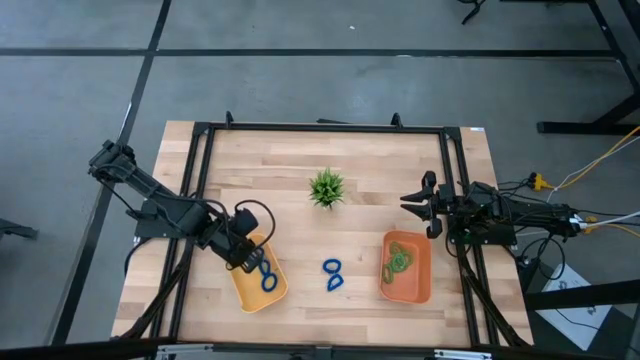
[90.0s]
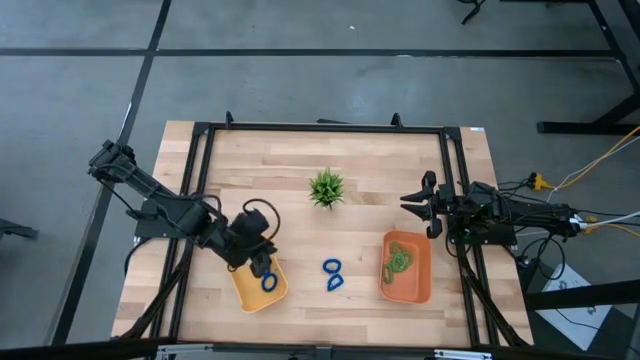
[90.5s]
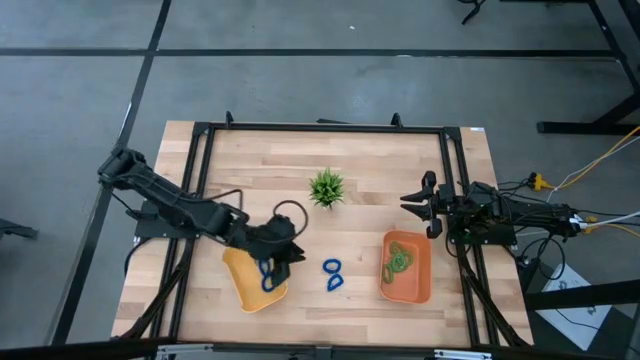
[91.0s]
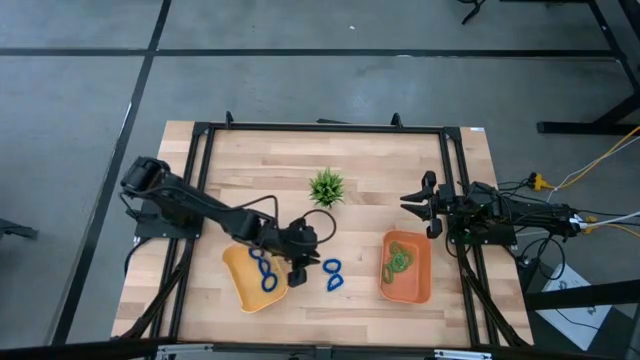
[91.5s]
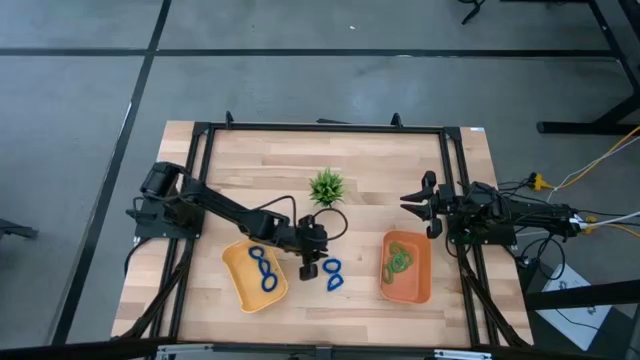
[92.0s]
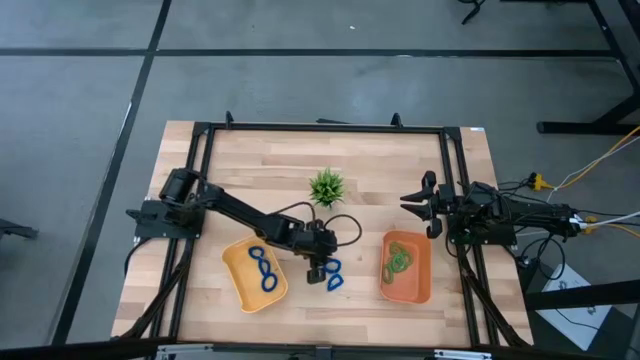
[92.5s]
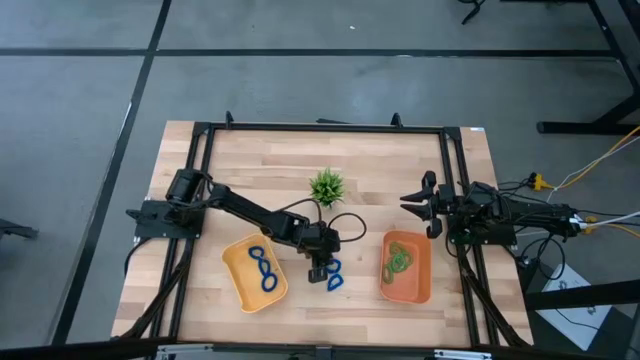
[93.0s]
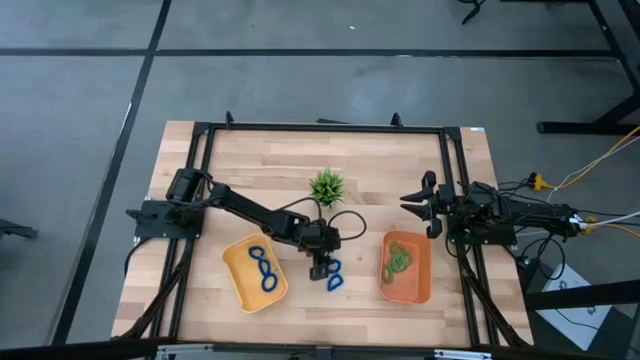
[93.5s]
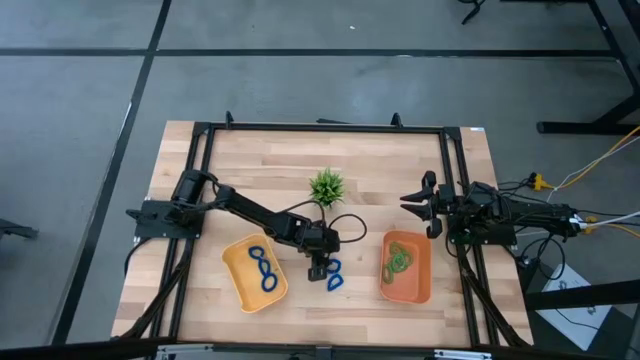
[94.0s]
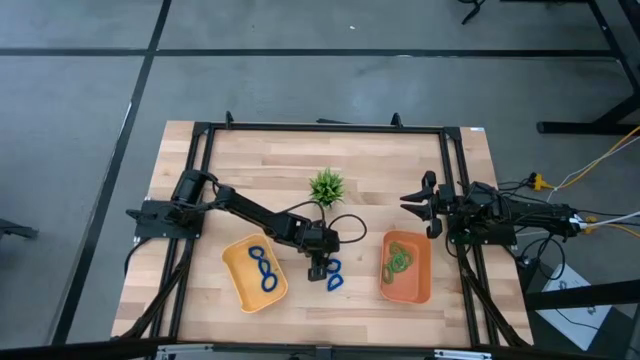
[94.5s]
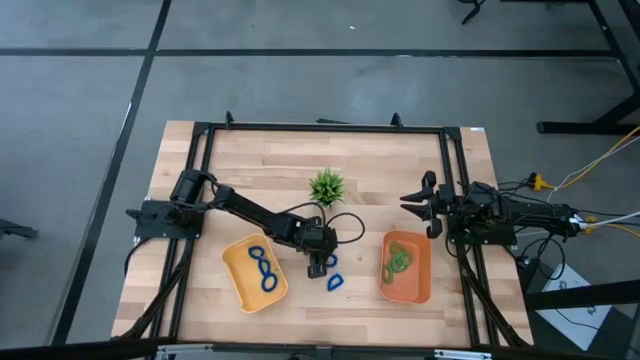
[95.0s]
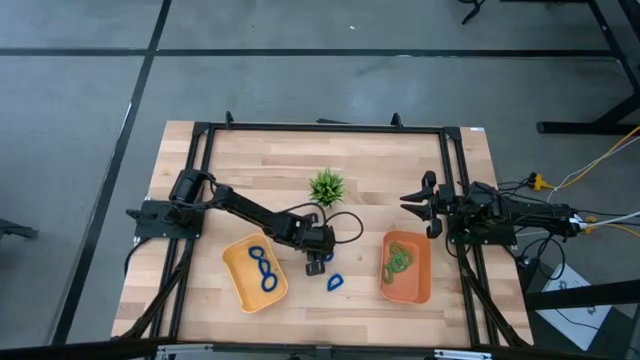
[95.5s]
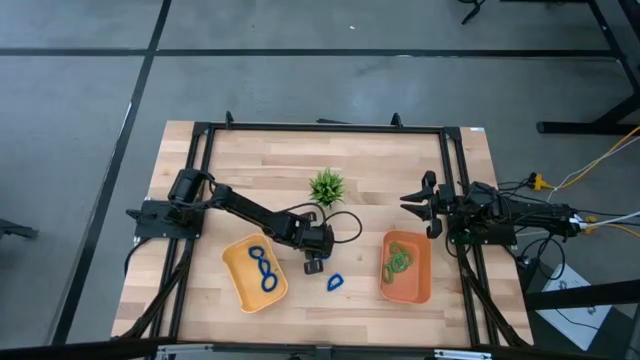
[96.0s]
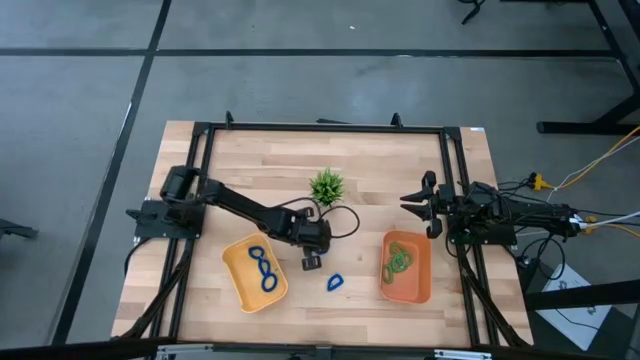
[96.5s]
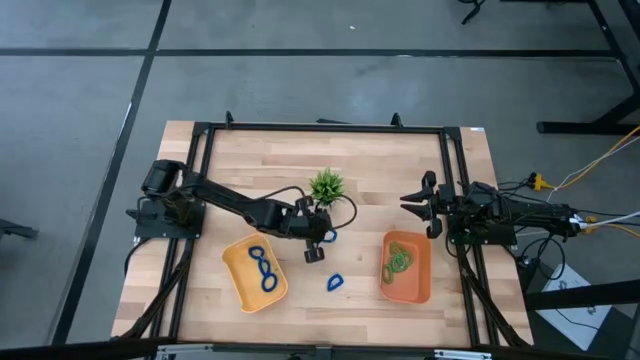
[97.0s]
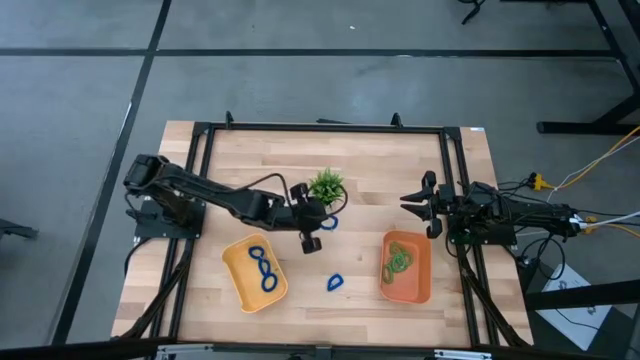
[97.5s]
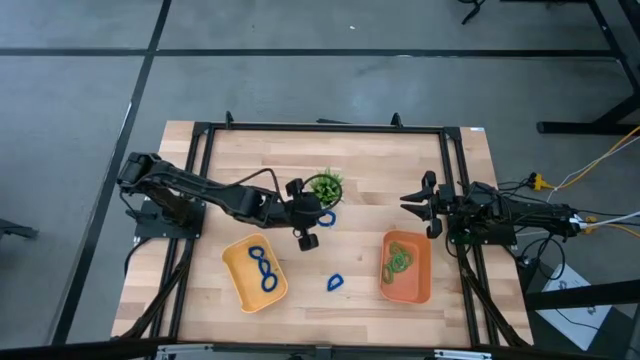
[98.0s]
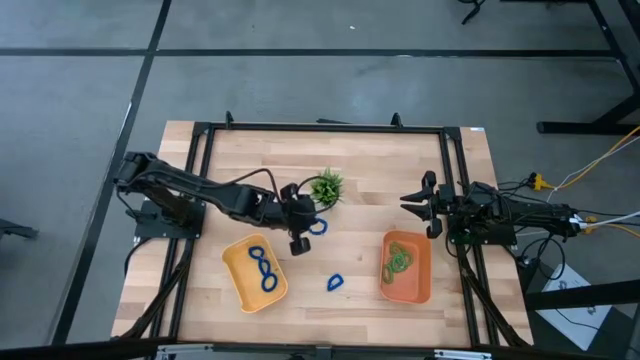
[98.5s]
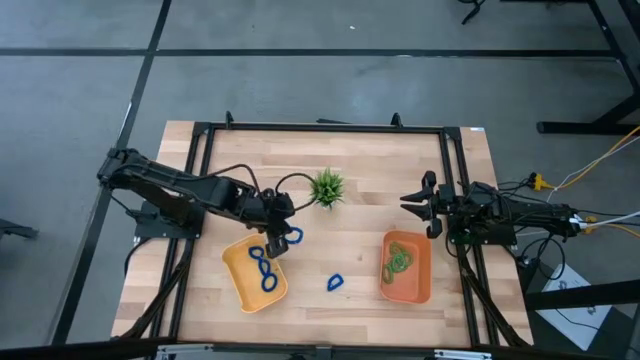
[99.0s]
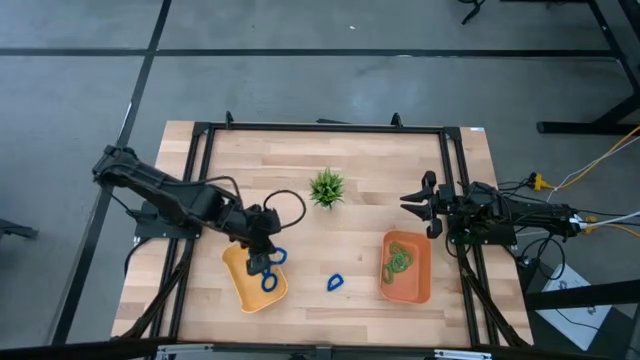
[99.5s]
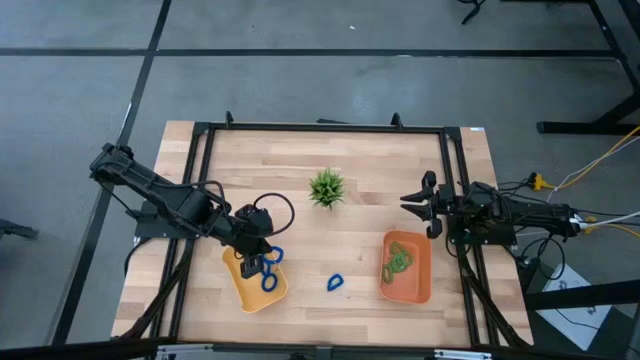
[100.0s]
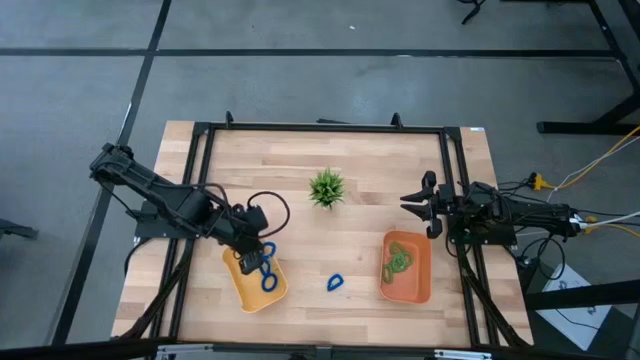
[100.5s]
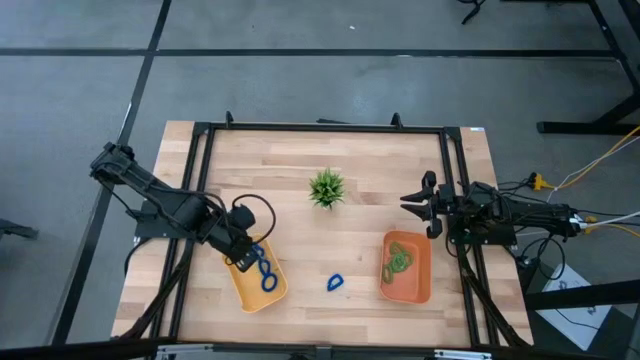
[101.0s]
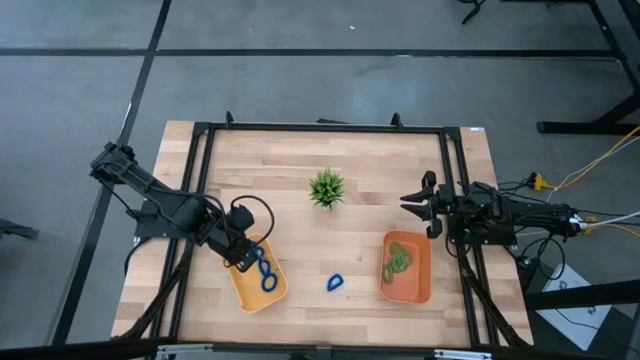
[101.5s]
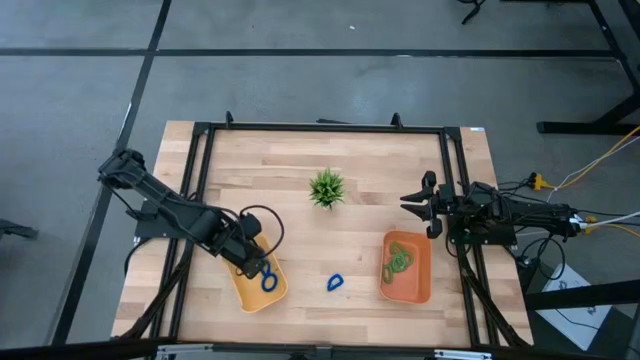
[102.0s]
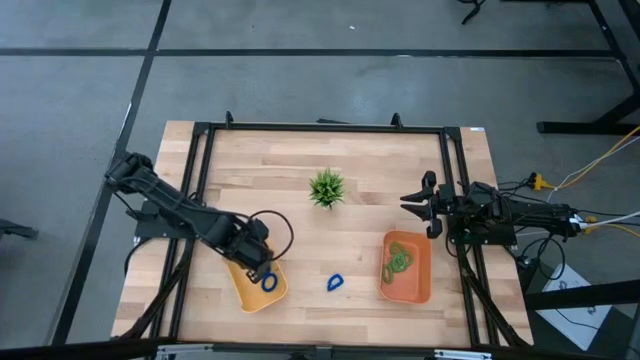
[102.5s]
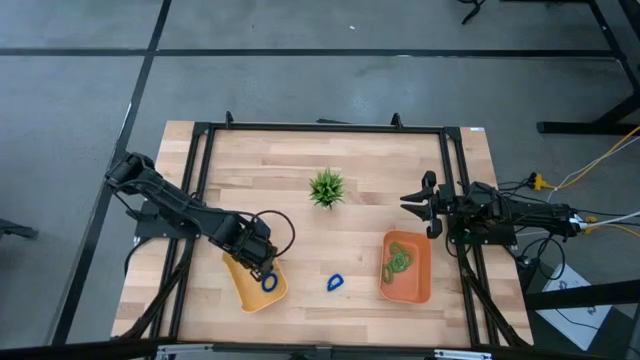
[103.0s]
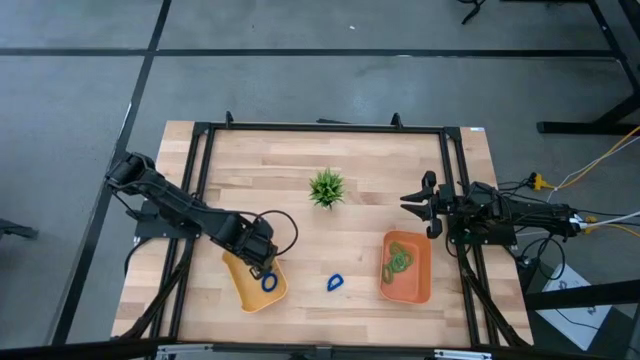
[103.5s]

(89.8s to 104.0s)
Task: Sort spring keychains
Put the blue spring keychain into the yellow bin

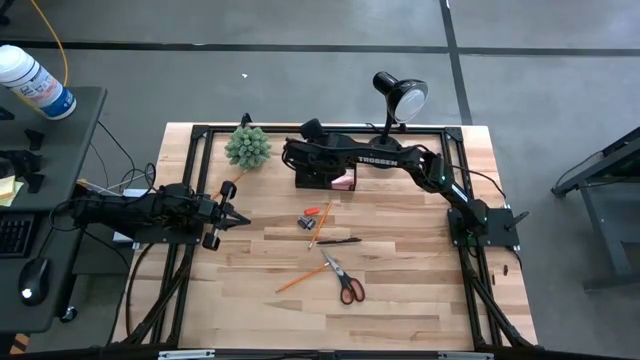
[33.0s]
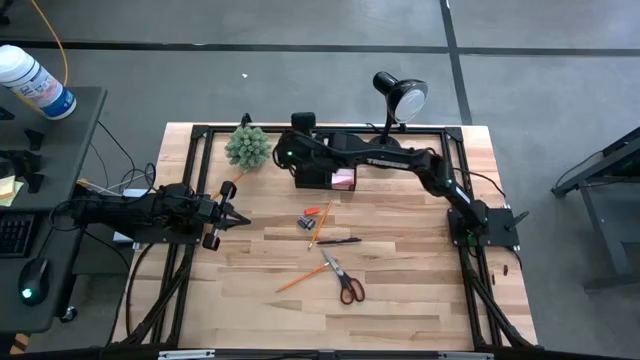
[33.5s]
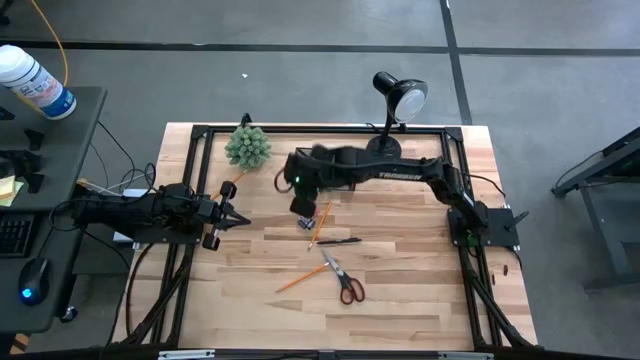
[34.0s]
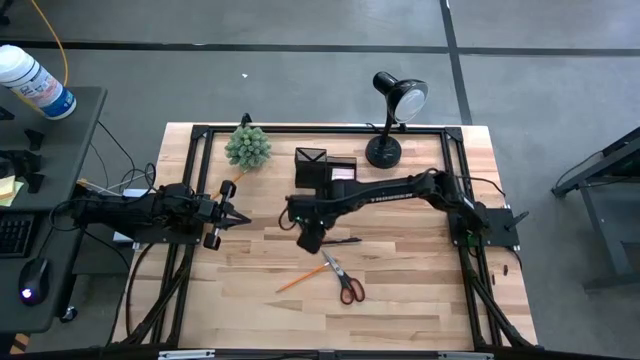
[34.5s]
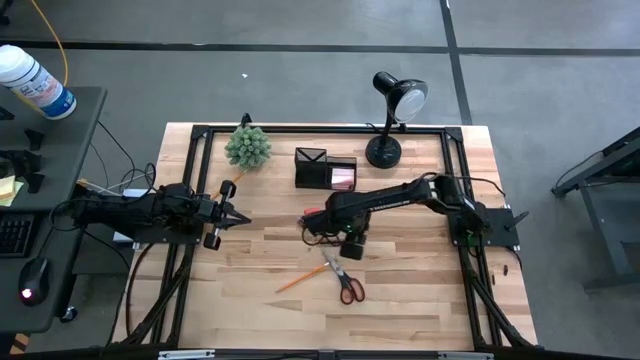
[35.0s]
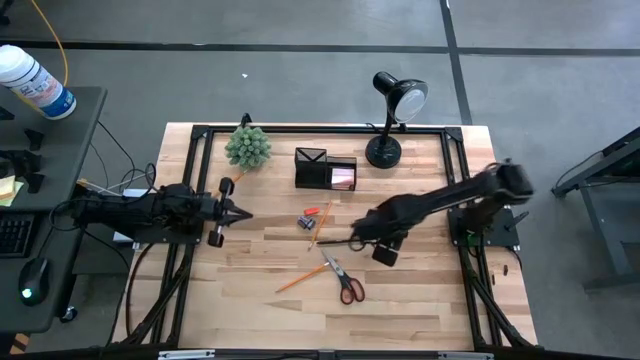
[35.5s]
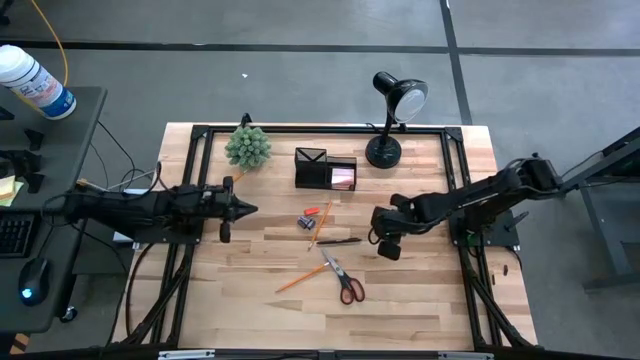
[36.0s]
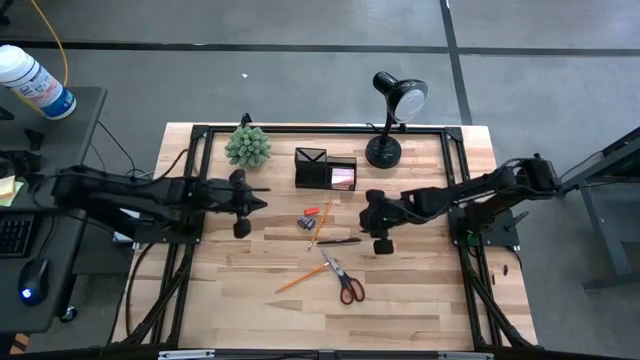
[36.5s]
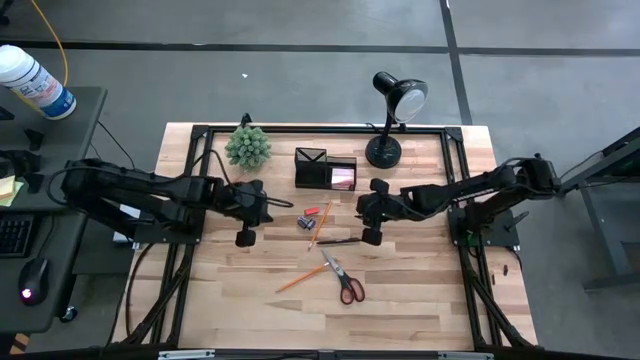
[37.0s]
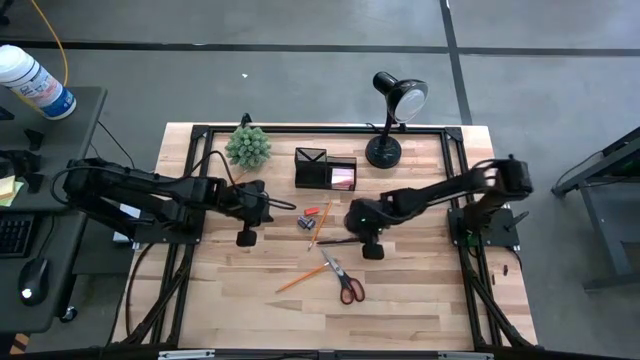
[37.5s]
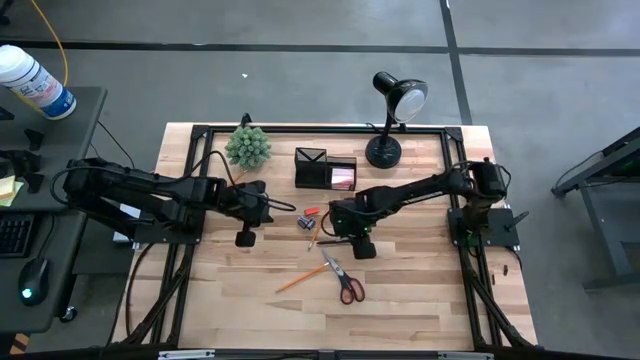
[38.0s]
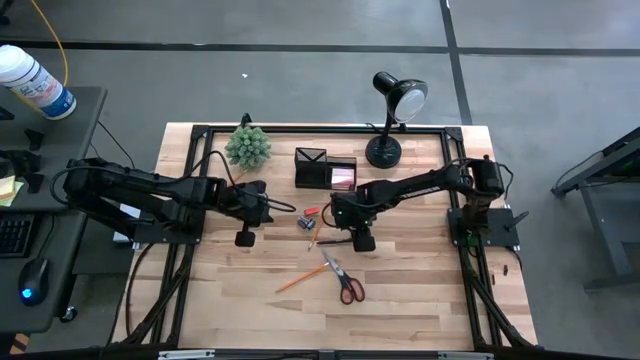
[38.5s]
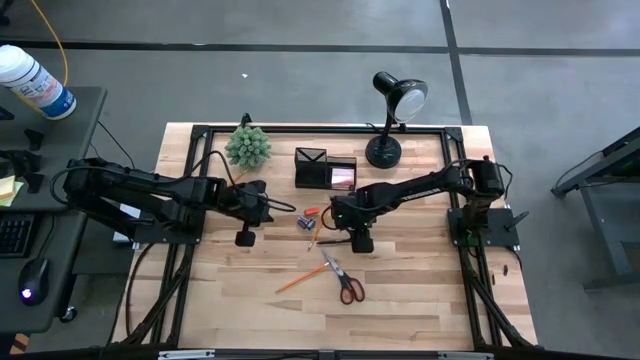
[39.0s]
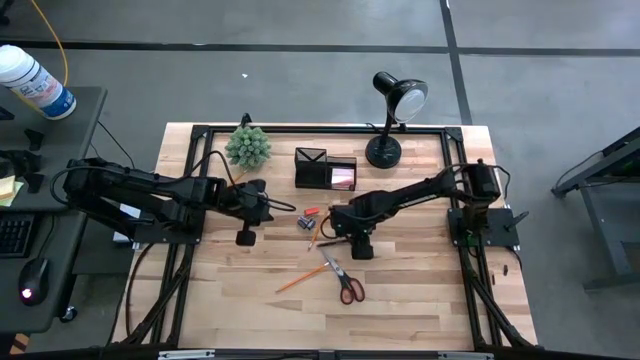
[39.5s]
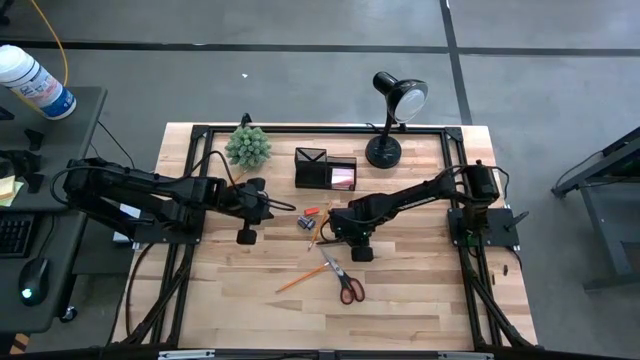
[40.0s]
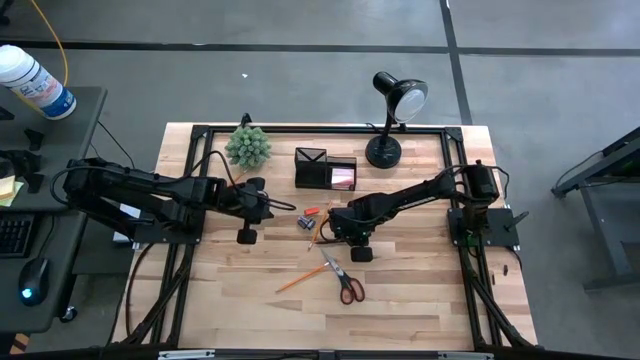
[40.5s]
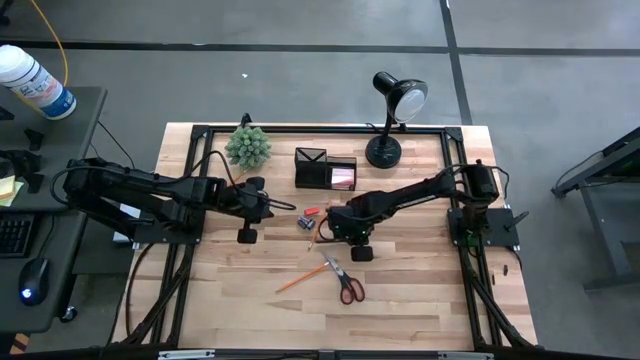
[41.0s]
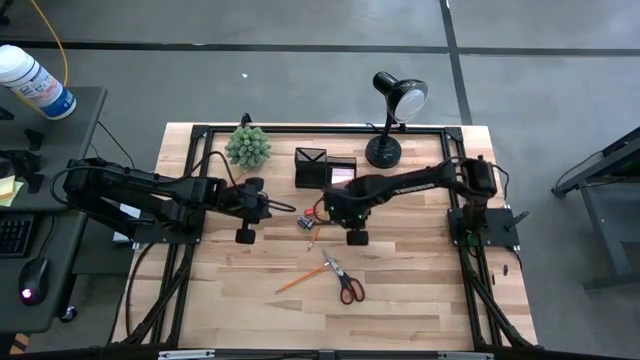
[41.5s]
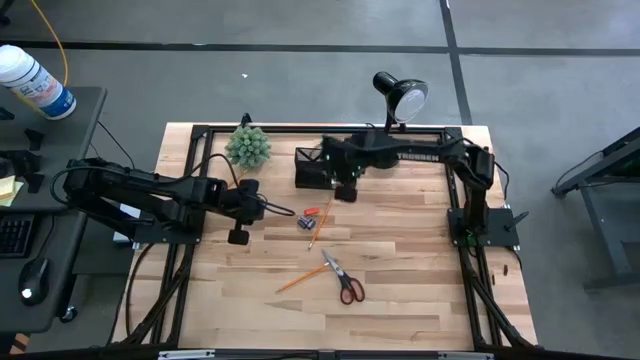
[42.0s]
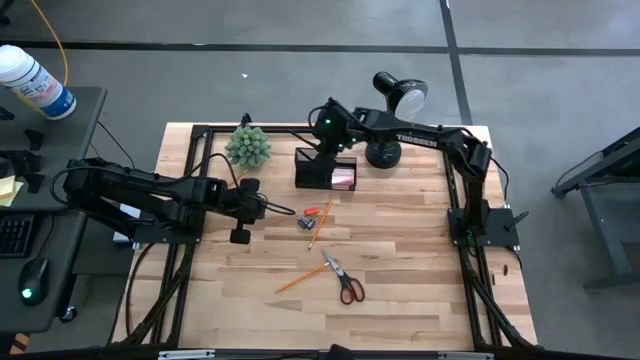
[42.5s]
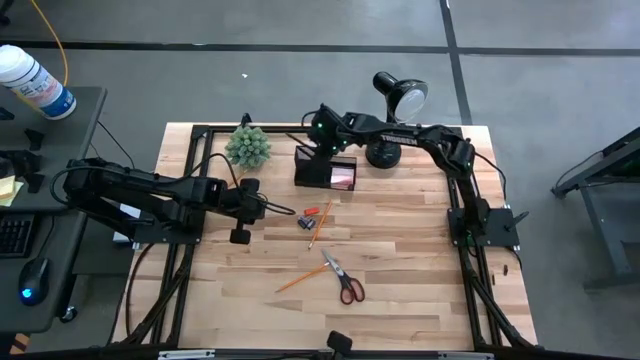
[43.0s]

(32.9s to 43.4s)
Task: Pick and place office supplies into organizer
Put the black pen into the desk organizer
